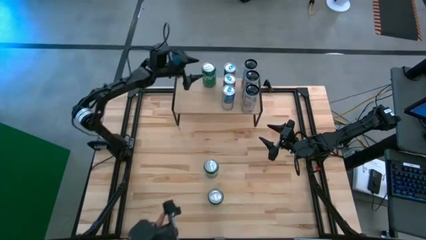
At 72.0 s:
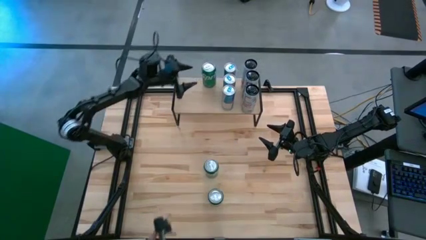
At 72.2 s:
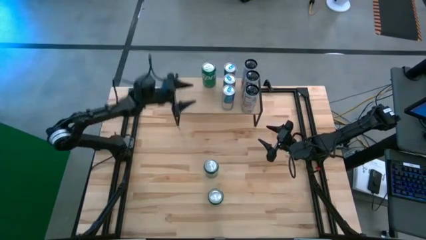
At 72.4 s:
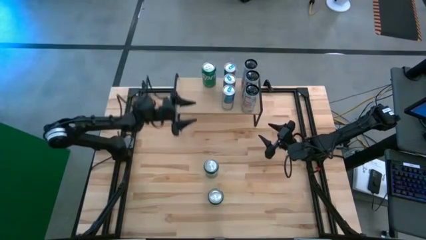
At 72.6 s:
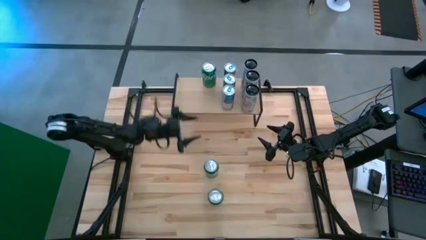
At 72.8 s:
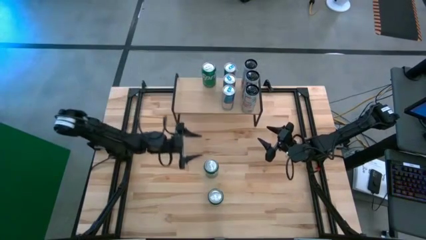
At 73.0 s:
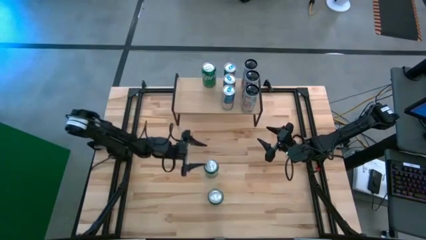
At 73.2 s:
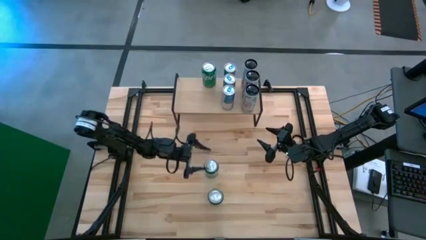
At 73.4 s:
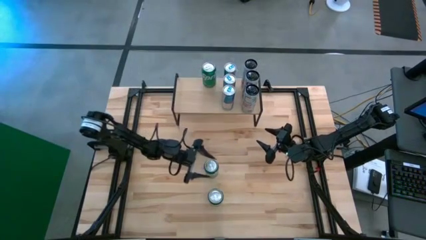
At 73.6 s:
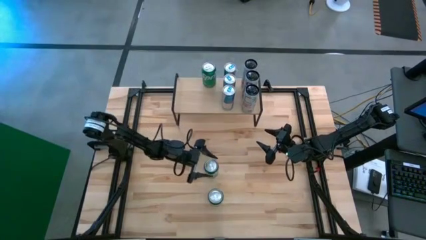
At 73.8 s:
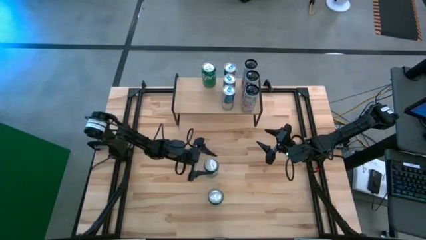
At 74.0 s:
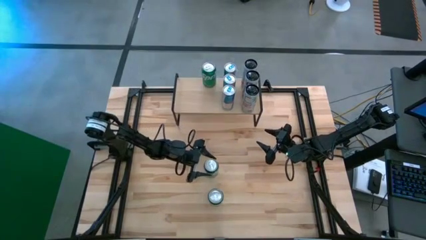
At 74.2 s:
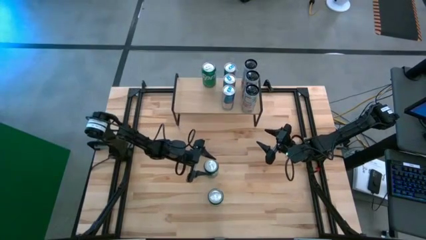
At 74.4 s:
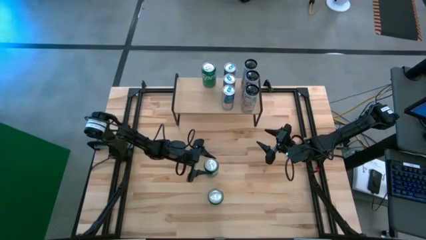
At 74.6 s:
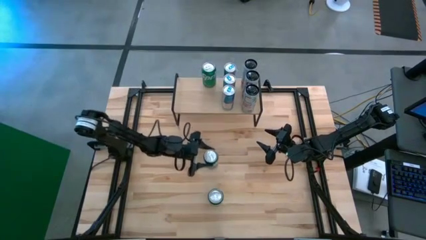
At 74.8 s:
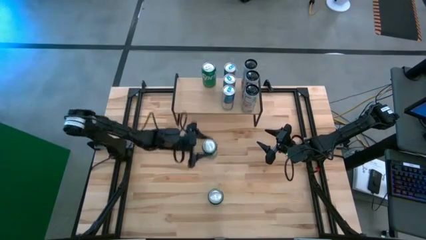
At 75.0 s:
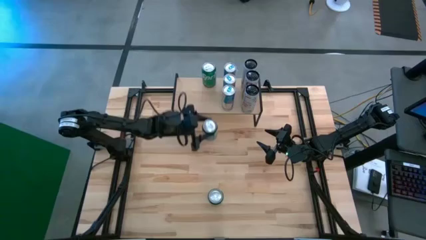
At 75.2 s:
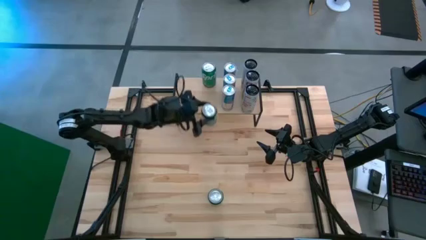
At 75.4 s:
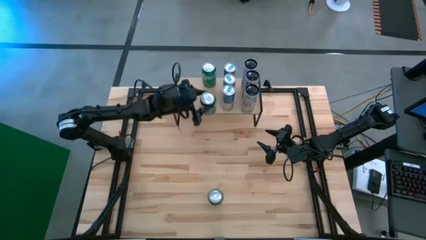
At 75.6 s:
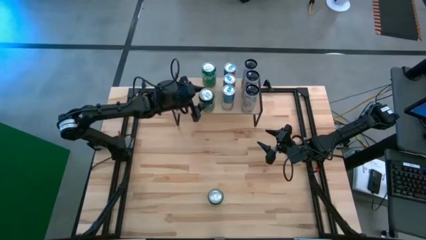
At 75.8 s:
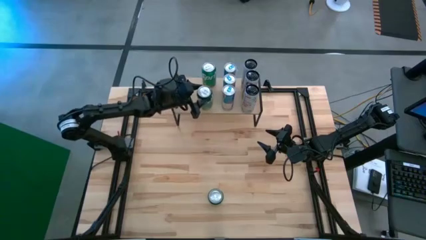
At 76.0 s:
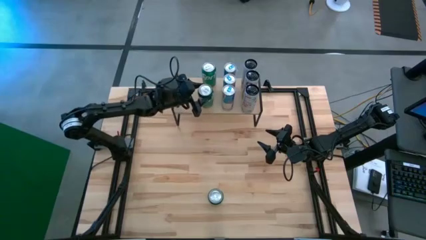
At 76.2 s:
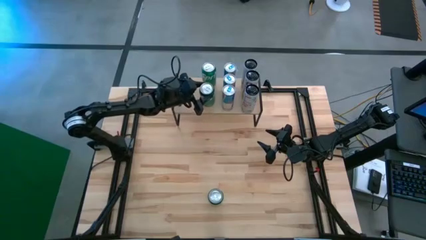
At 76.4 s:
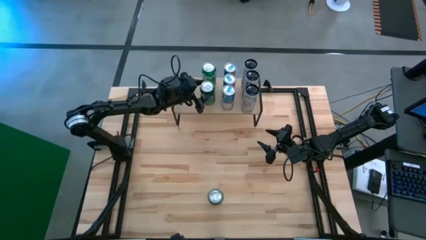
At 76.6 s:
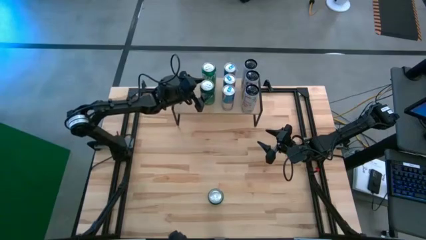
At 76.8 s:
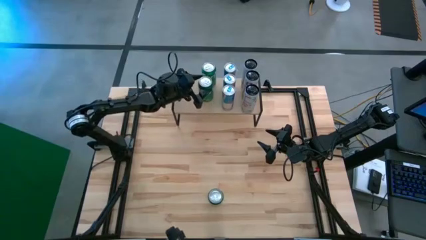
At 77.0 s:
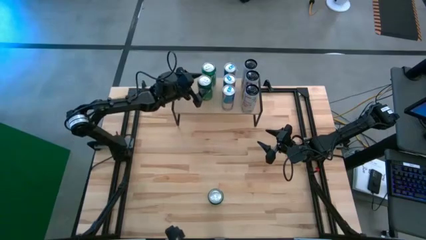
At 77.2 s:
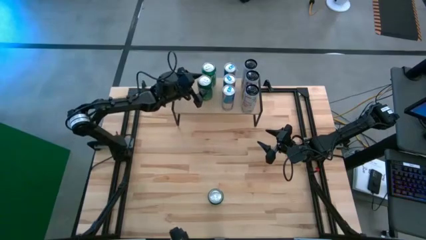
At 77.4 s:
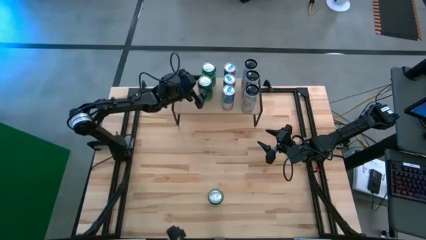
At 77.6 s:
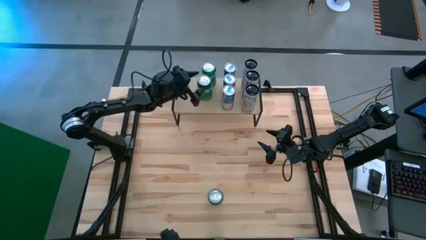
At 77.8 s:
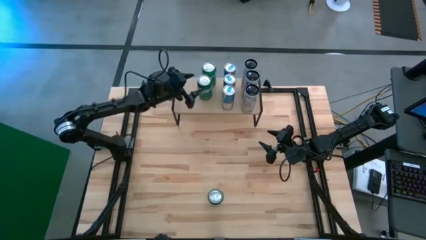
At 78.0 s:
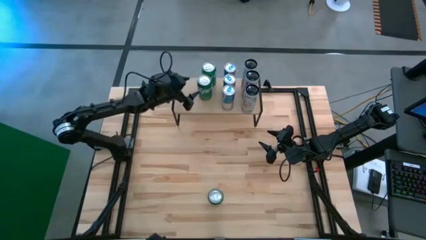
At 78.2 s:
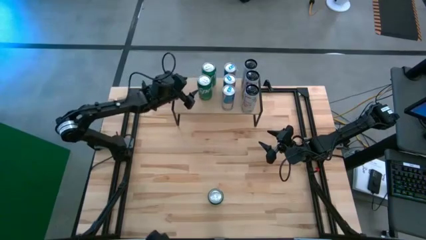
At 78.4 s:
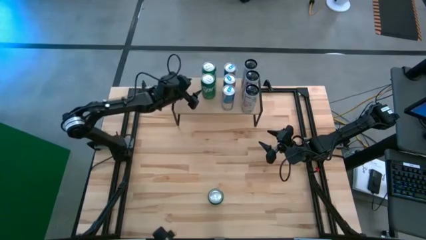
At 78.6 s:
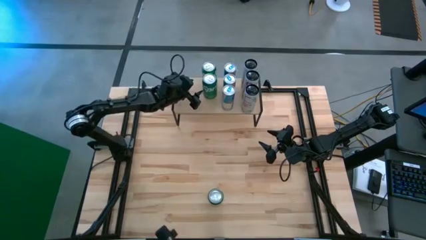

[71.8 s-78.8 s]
Task: Place canned beverage on shelf
Put the top green soda can on the shelf aligned with the other green soda can

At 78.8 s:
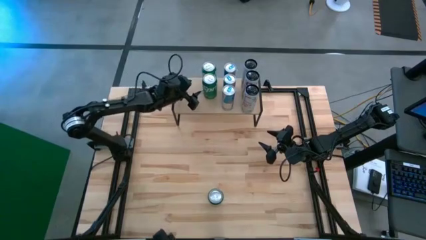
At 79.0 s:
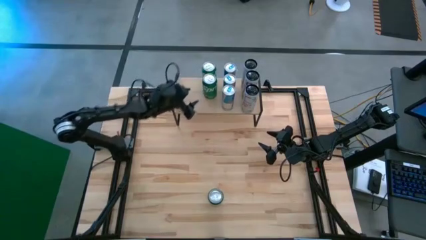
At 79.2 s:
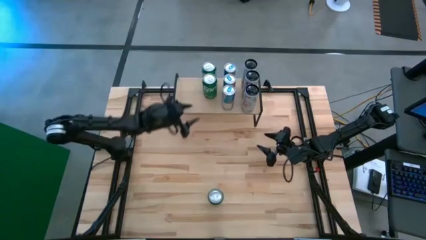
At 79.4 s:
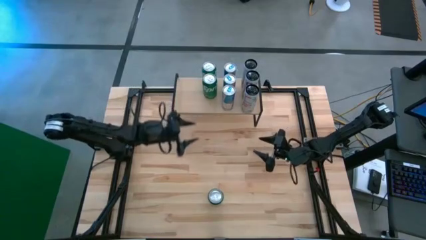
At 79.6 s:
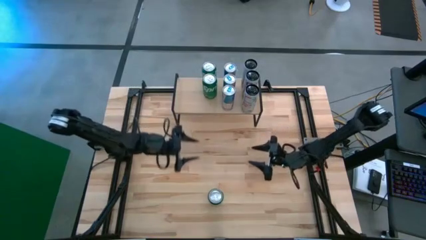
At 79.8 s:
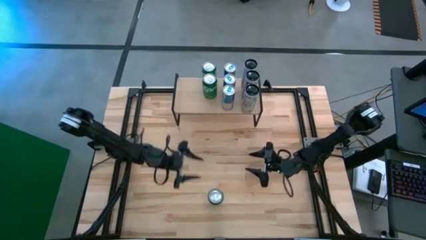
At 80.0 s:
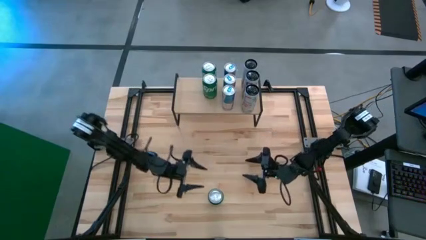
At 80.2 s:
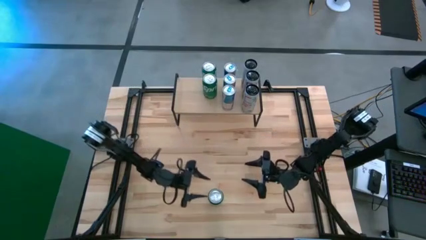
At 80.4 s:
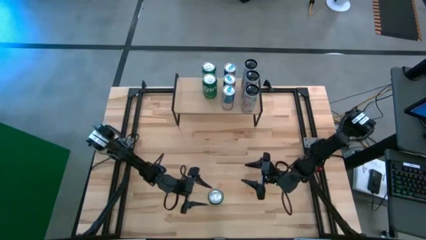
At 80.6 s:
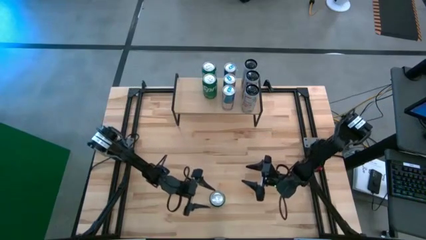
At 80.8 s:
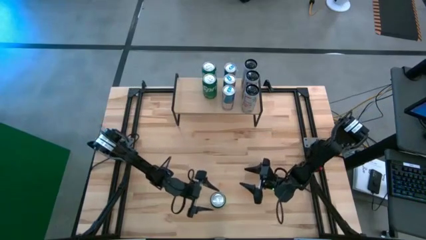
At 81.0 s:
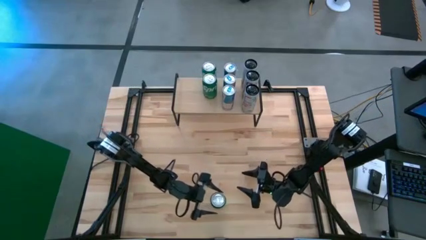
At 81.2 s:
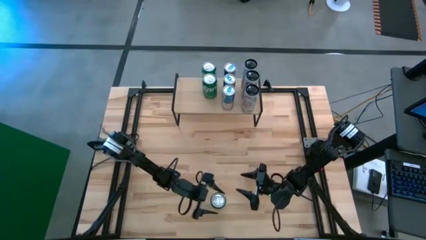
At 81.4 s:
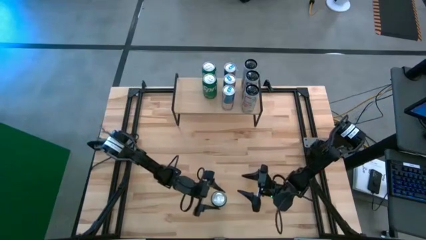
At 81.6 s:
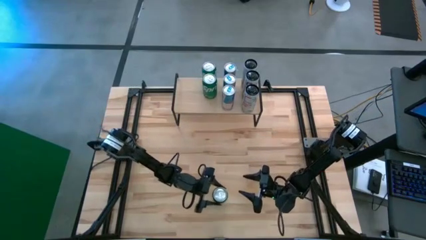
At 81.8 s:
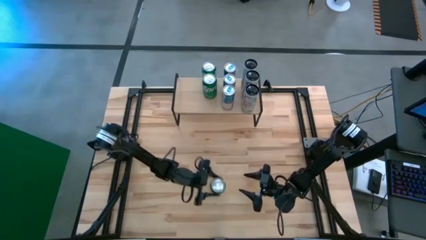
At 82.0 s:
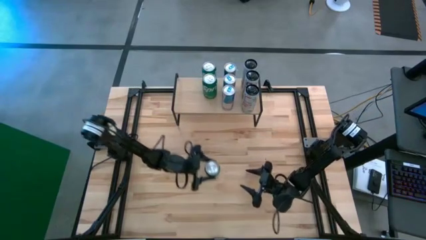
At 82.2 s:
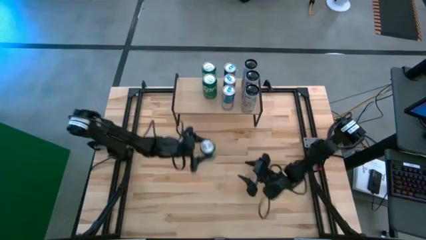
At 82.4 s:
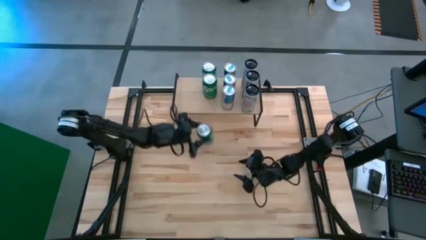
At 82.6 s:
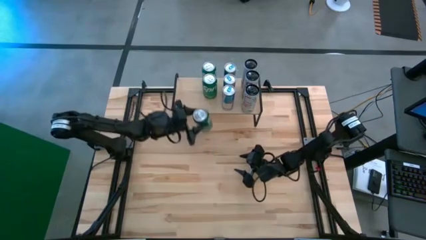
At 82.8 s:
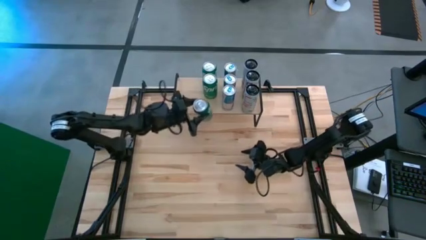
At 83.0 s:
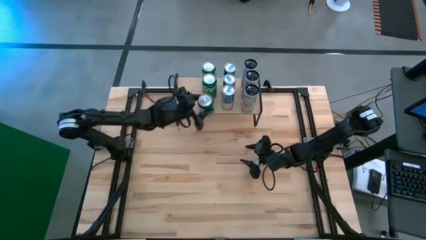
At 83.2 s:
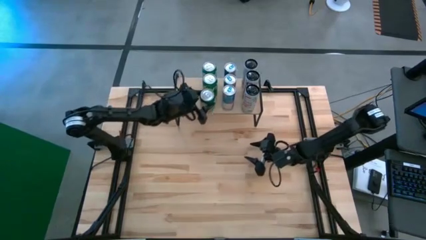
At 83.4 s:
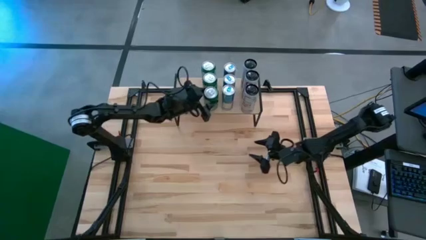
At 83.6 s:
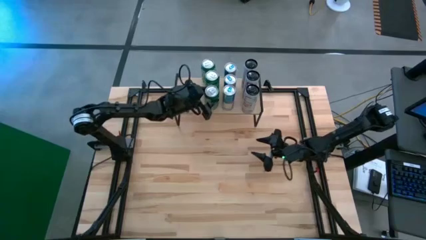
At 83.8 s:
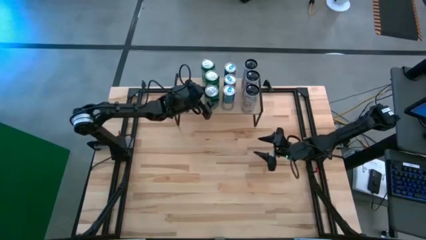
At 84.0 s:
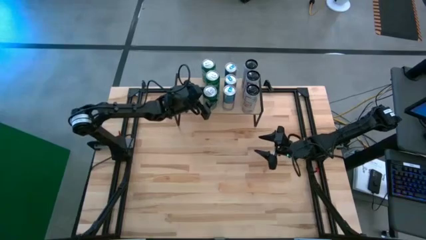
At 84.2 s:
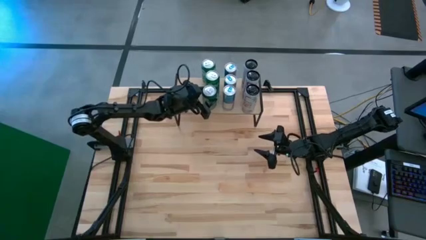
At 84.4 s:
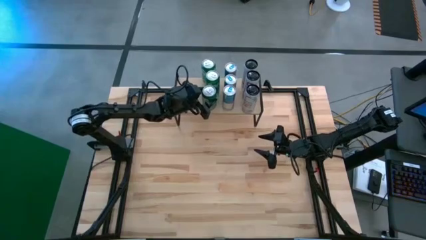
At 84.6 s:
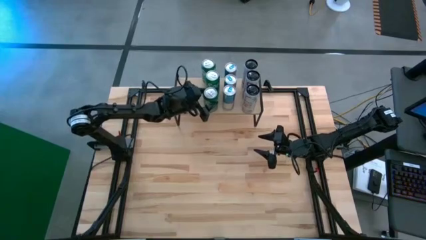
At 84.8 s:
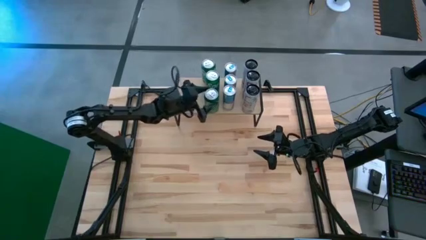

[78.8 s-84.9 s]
Put the green soda can on the shelf aligned with the other green soda cans

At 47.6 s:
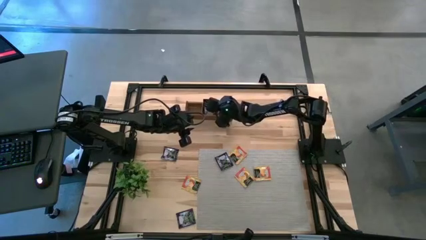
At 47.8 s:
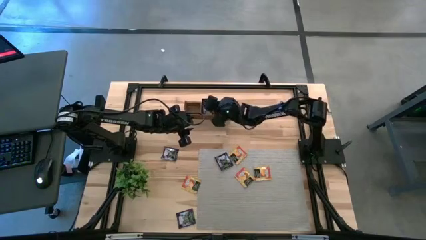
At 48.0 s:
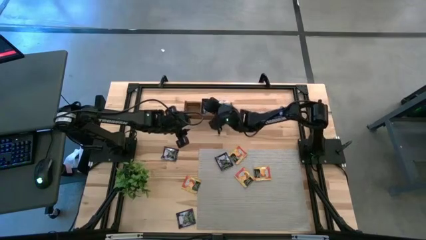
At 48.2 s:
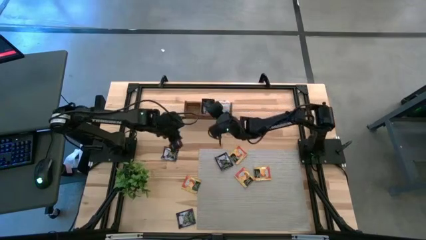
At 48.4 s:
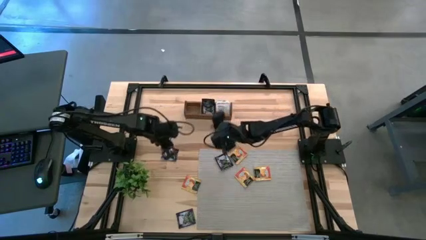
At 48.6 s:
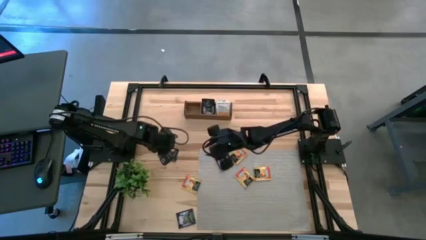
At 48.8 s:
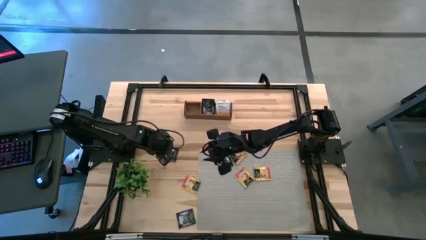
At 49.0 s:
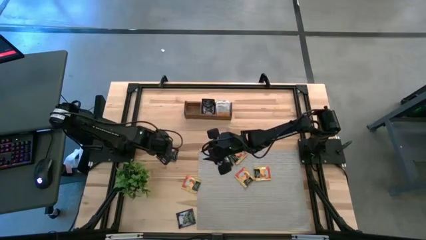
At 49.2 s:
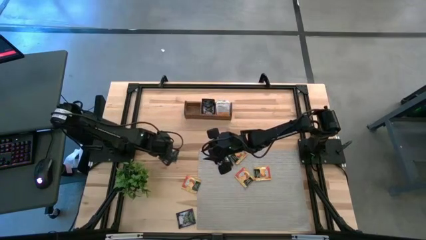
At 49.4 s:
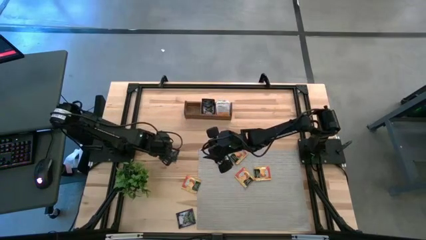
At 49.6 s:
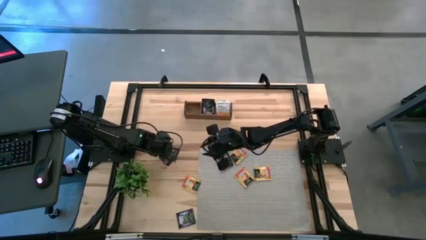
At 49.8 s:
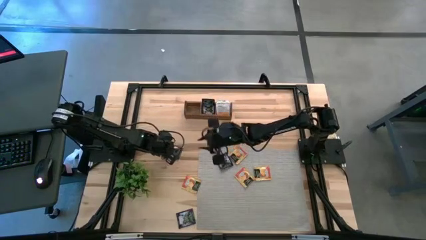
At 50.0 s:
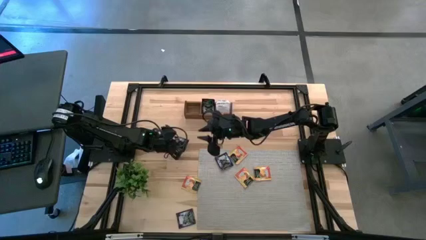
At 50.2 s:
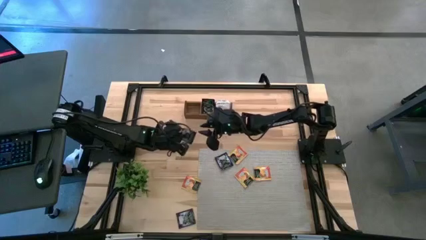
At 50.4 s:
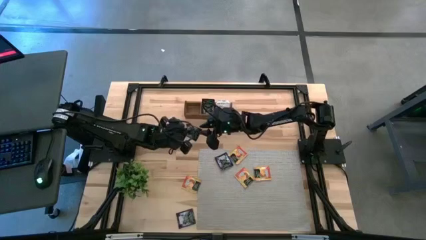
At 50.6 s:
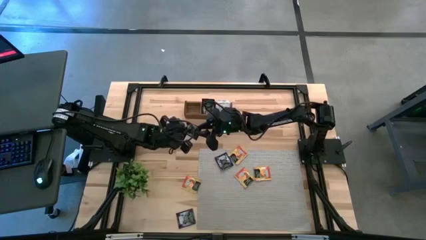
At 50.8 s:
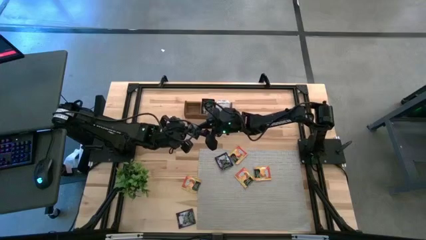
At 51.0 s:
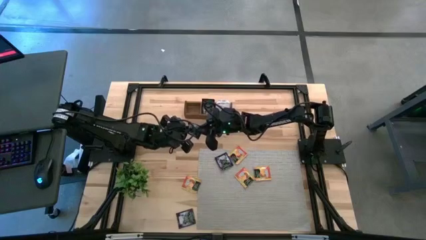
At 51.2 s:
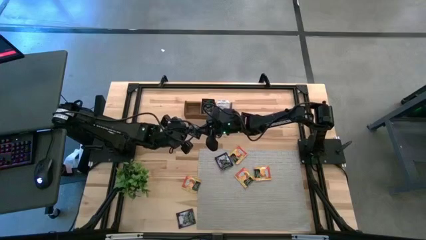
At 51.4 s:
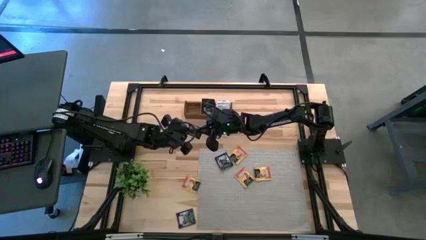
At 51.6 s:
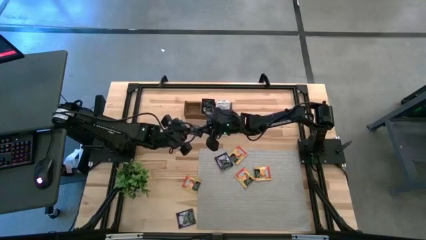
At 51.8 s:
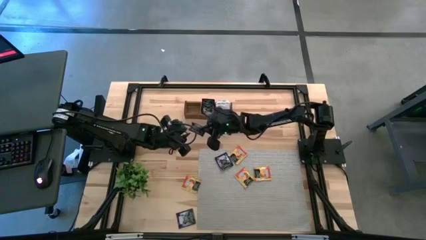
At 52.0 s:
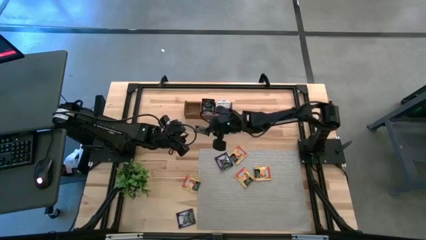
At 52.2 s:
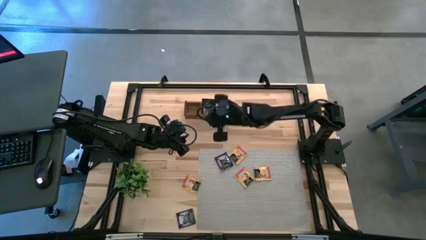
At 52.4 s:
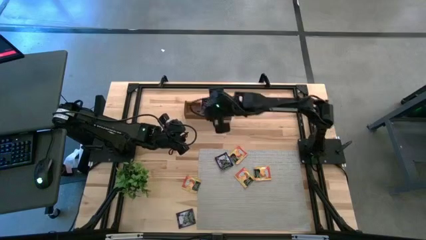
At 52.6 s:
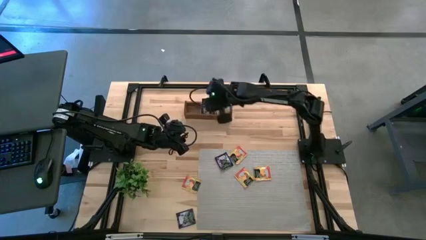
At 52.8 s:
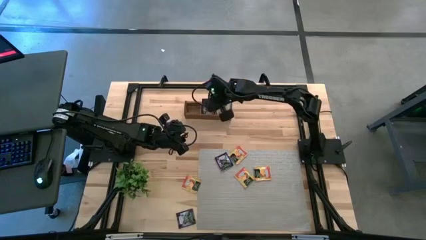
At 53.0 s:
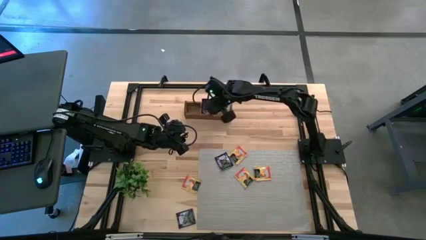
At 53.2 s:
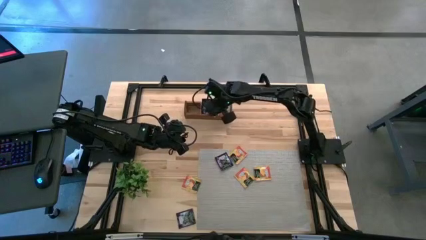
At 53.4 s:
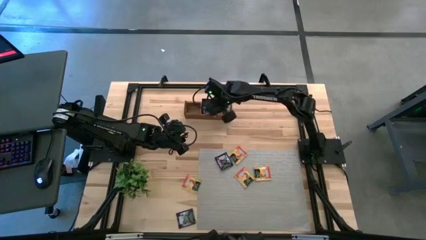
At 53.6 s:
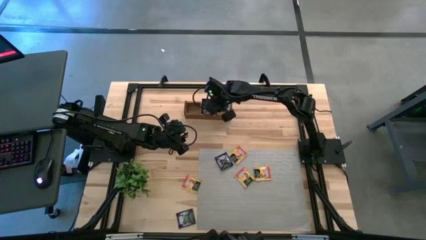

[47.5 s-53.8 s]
Task: Pick & Place Tea
Put the black tea bag into the middle section of the wooden organizer
